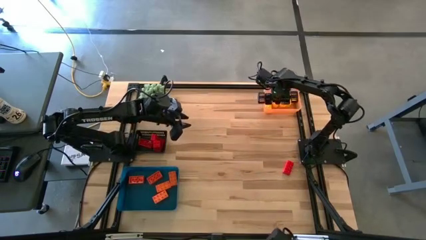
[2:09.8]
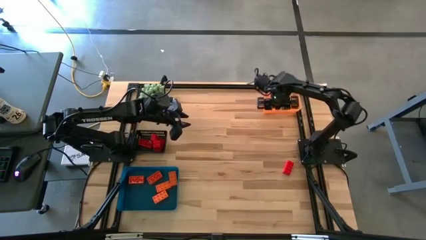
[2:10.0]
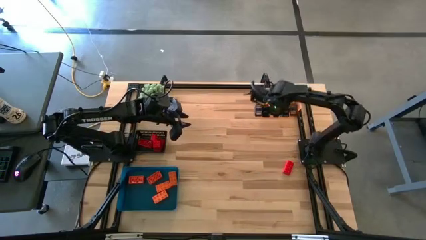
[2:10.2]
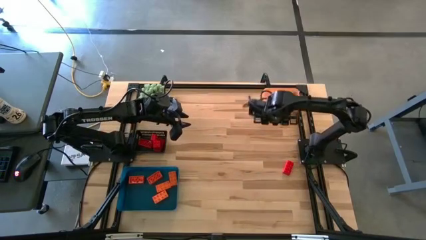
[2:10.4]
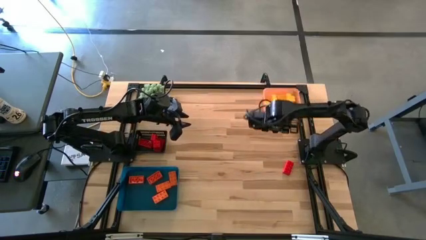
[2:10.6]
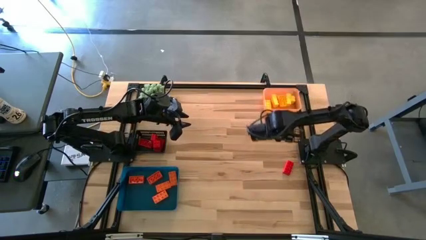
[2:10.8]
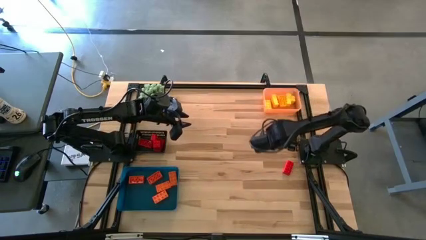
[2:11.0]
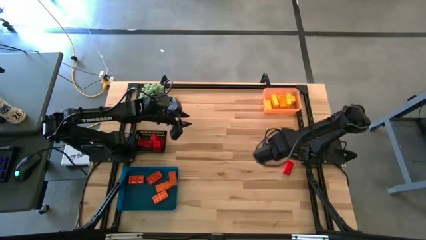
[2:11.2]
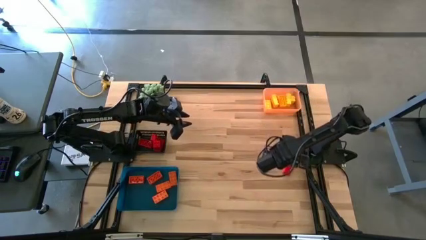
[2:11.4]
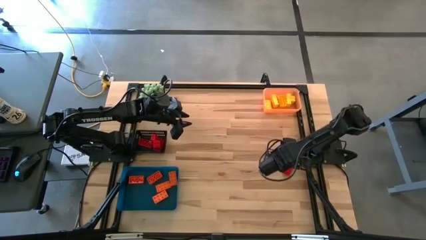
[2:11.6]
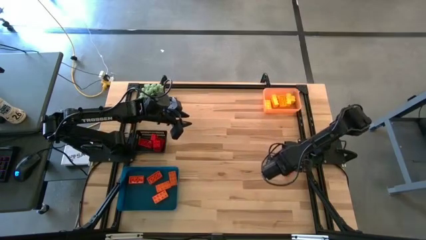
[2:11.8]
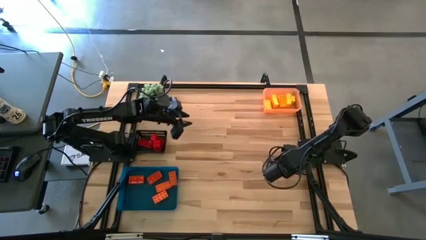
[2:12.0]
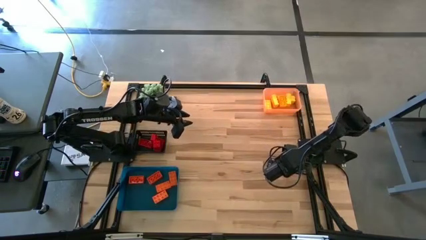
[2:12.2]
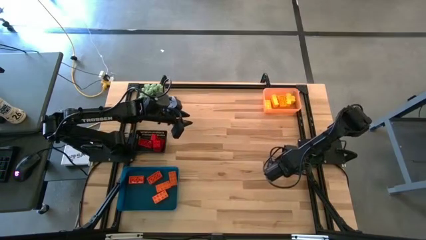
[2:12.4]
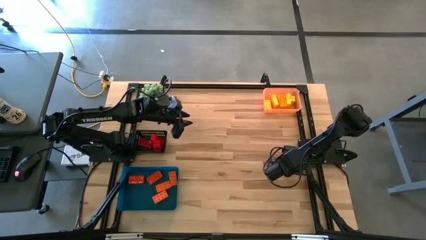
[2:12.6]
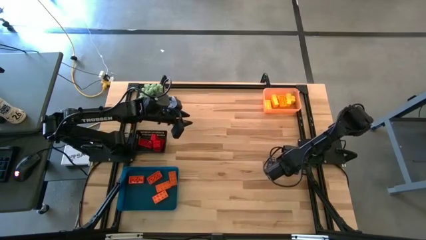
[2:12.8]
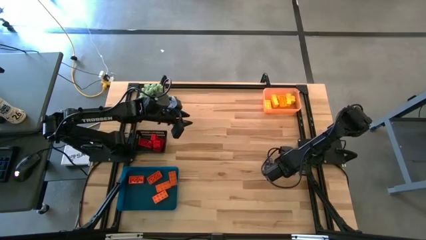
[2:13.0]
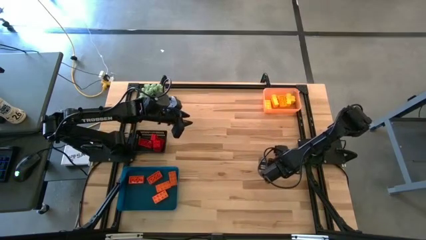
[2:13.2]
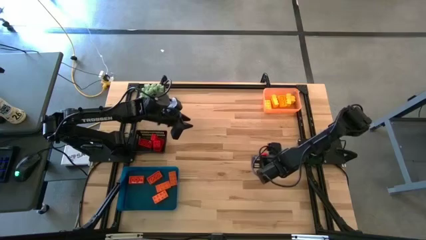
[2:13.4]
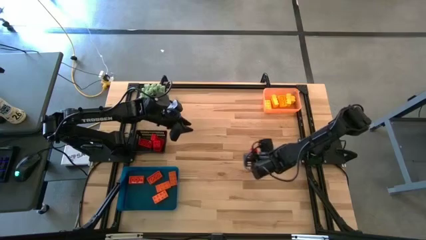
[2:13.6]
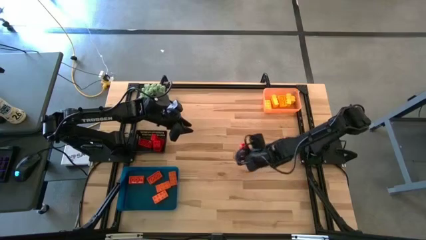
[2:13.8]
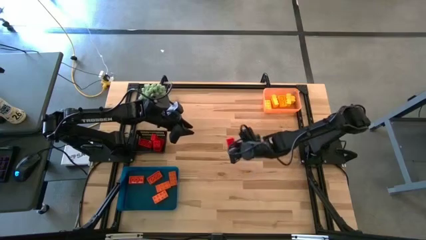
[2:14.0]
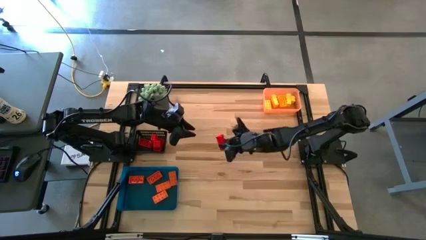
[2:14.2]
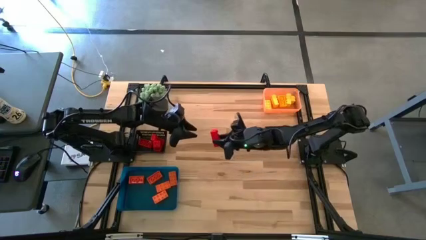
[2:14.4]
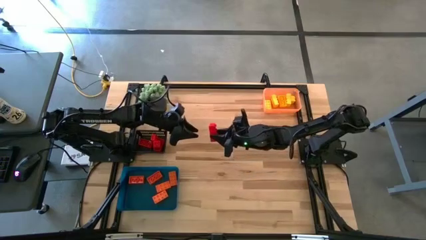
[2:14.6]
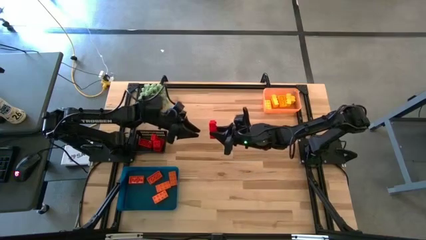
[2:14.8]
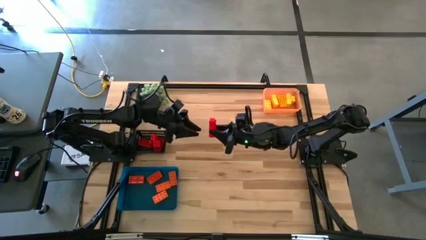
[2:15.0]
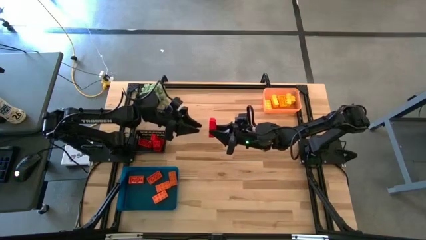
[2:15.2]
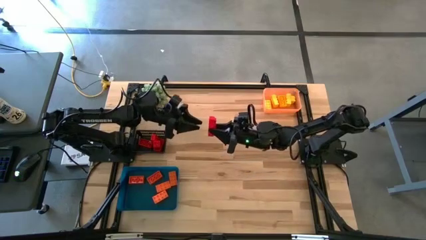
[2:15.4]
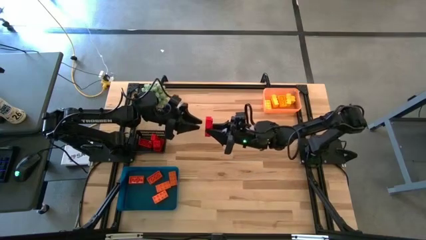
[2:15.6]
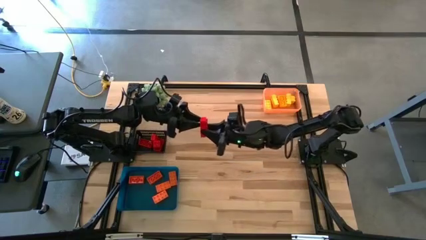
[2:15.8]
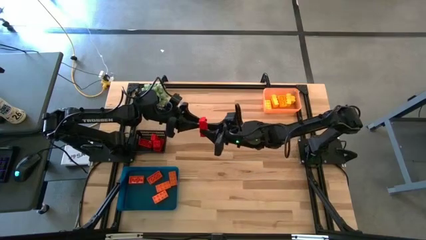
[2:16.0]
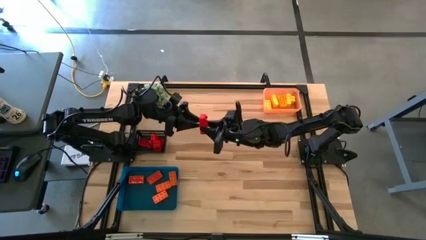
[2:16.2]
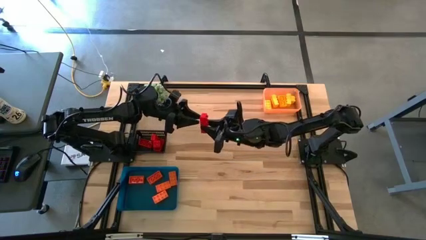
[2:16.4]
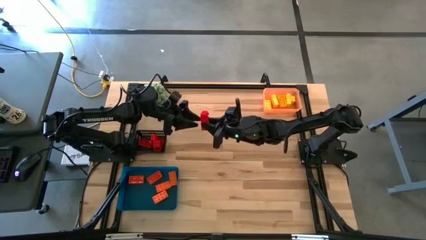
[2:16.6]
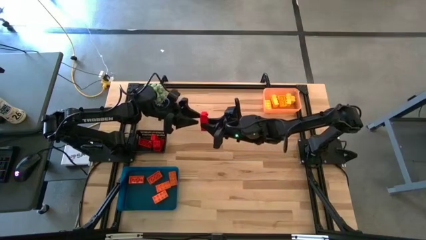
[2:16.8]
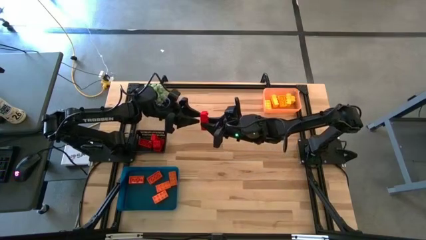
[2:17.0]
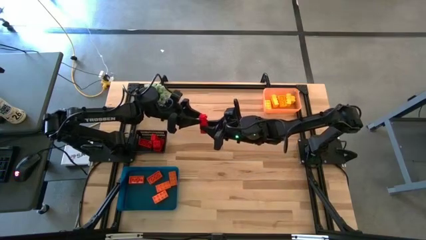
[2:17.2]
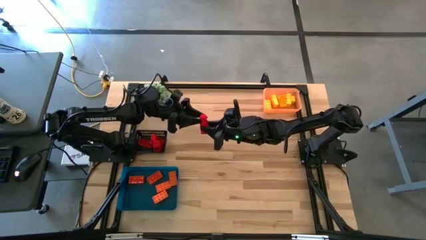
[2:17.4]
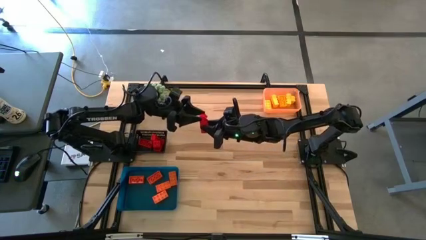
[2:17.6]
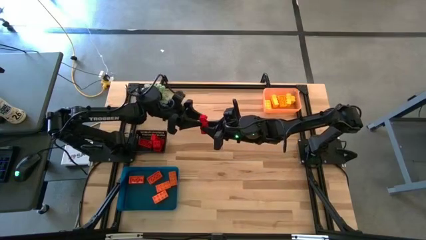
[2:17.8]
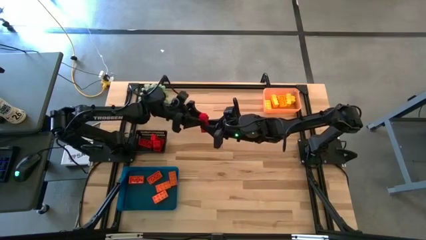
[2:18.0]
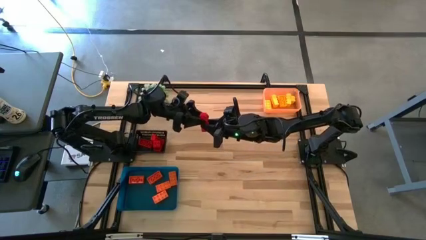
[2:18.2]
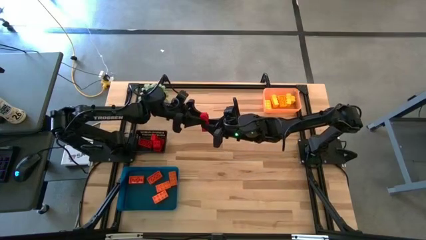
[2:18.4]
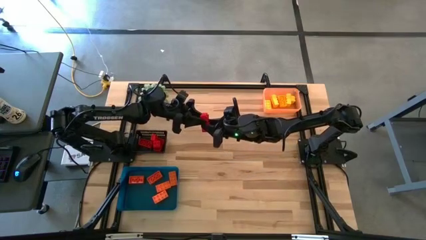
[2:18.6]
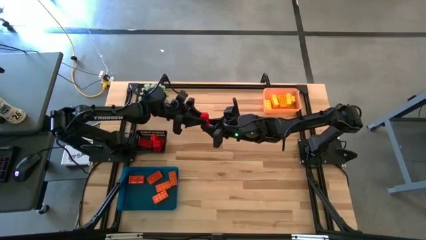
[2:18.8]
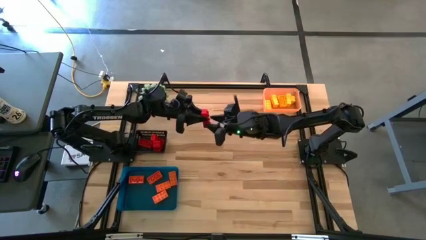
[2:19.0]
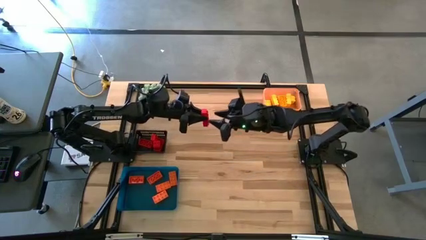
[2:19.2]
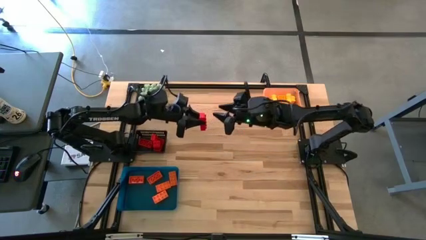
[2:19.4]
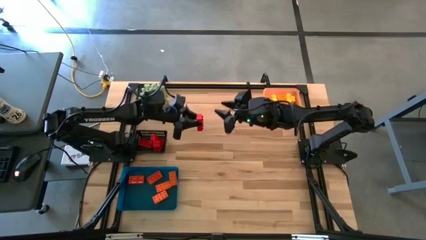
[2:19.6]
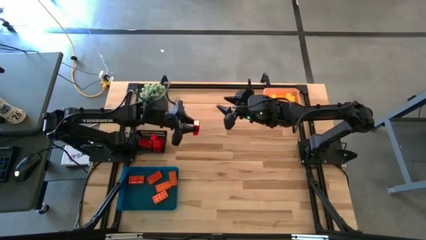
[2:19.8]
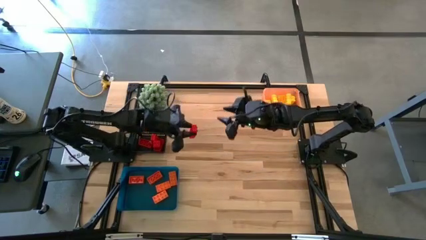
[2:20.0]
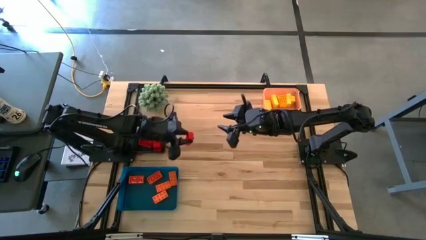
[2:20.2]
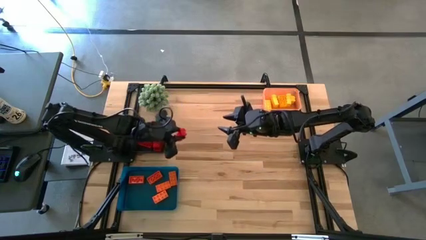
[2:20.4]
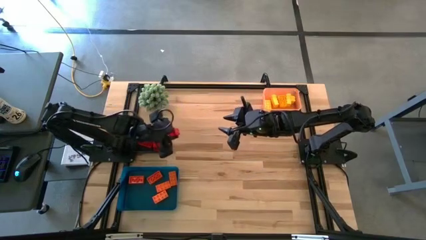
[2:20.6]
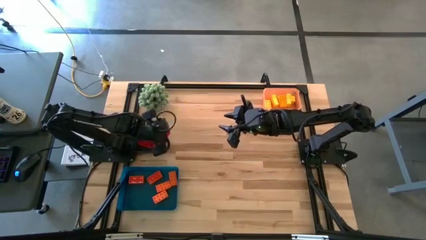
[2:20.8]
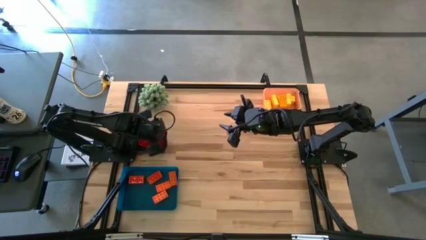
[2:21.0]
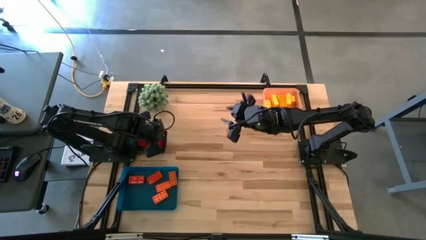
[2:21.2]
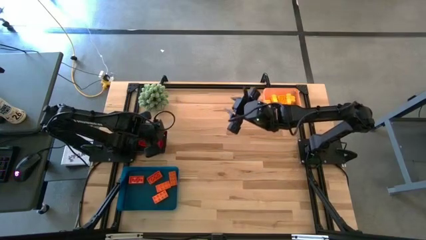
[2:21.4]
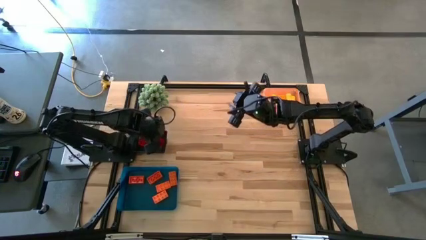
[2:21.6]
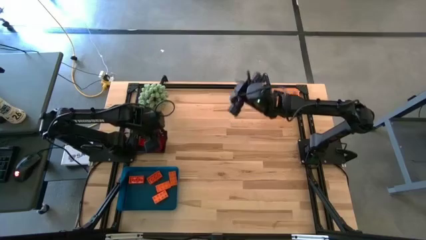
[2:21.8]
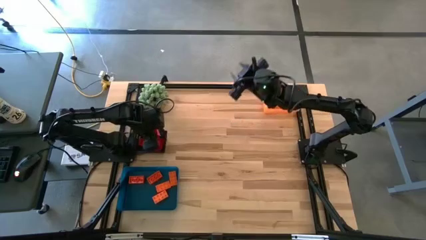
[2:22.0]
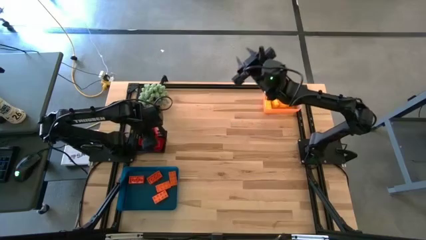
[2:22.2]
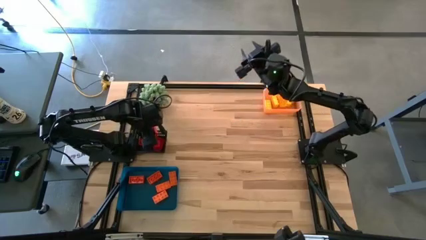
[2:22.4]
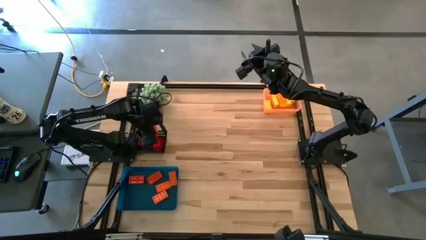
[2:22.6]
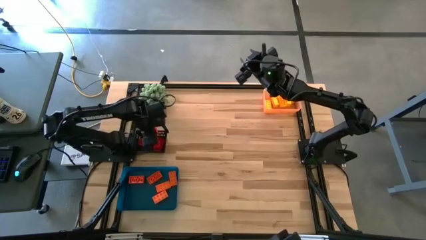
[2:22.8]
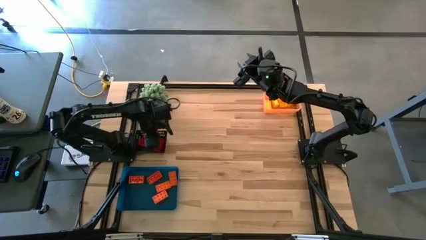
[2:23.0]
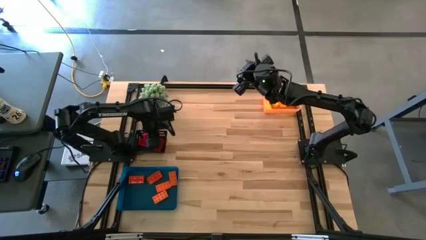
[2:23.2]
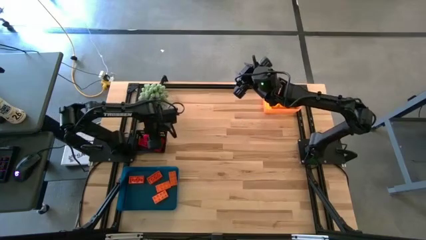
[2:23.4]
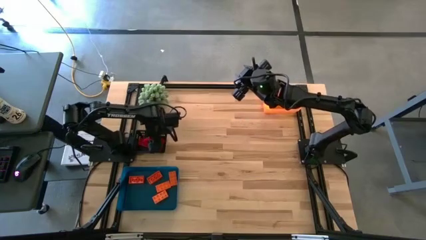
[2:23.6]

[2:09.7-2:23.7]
Task: Sort & place blocks by color
Put the red game piece into the black bin
